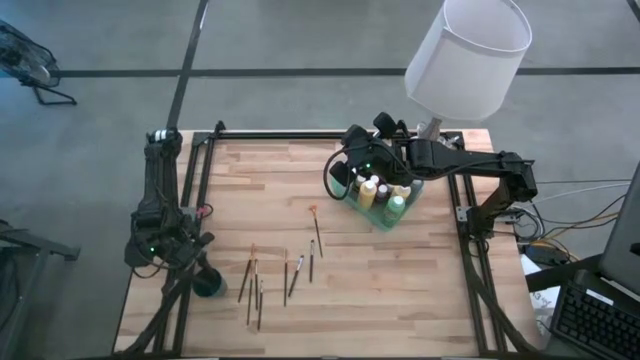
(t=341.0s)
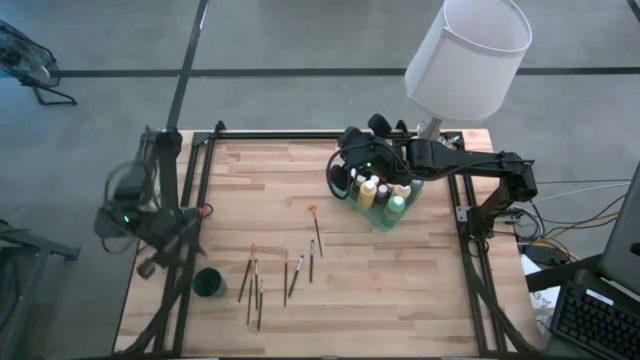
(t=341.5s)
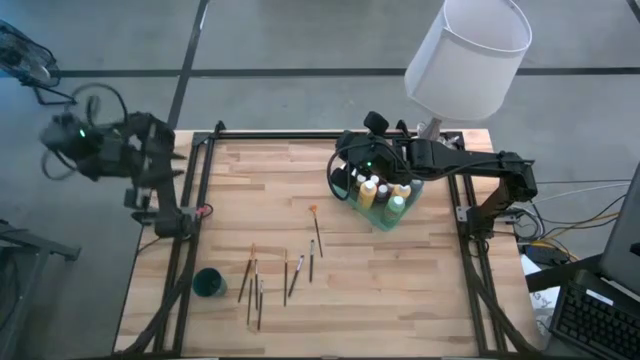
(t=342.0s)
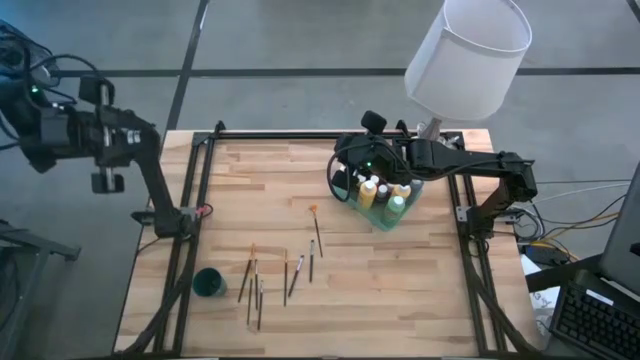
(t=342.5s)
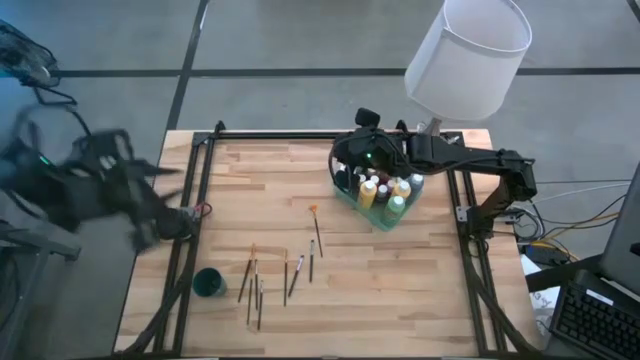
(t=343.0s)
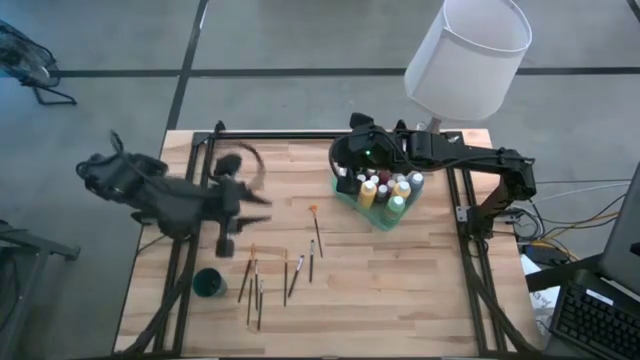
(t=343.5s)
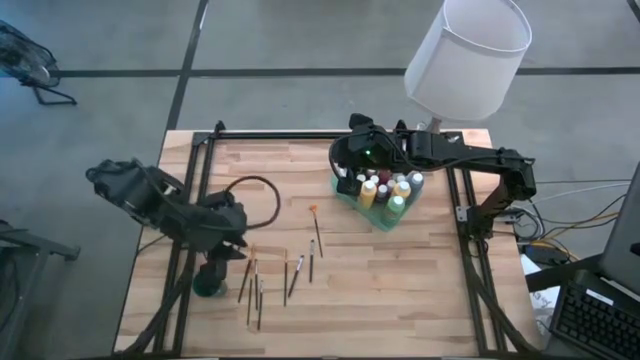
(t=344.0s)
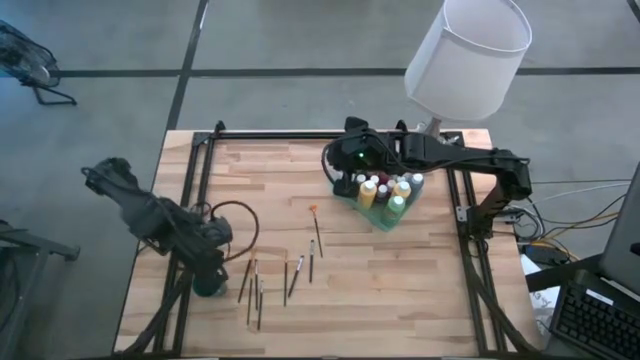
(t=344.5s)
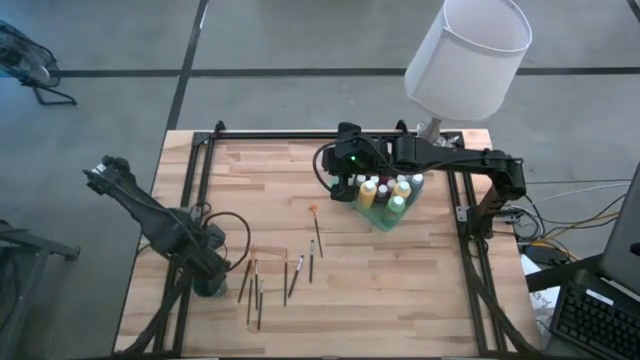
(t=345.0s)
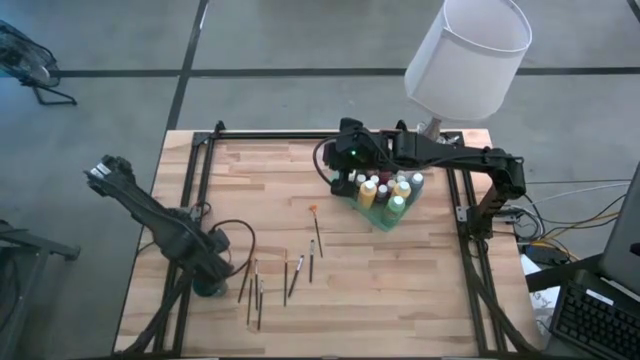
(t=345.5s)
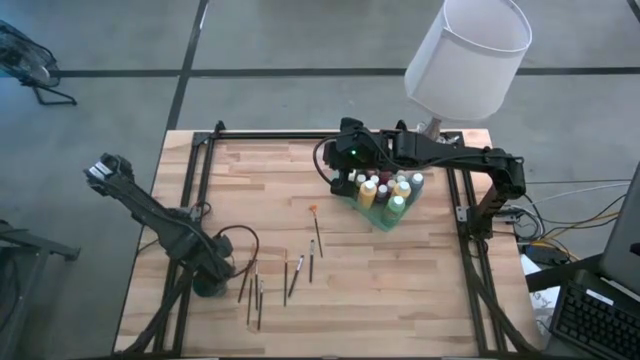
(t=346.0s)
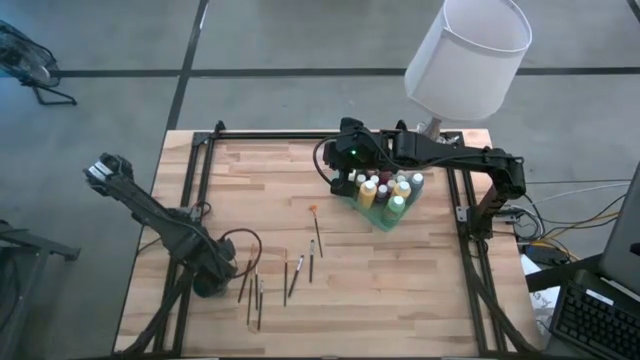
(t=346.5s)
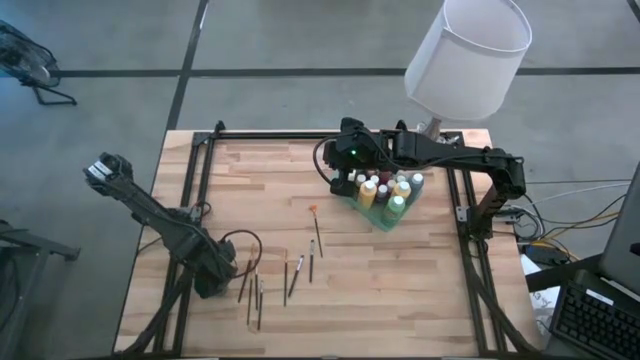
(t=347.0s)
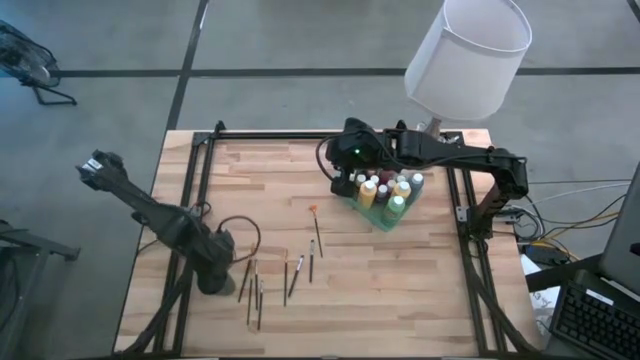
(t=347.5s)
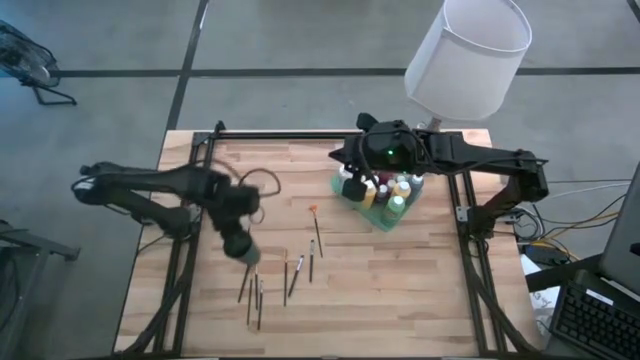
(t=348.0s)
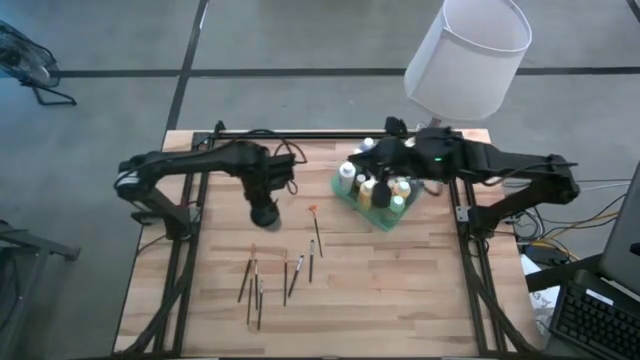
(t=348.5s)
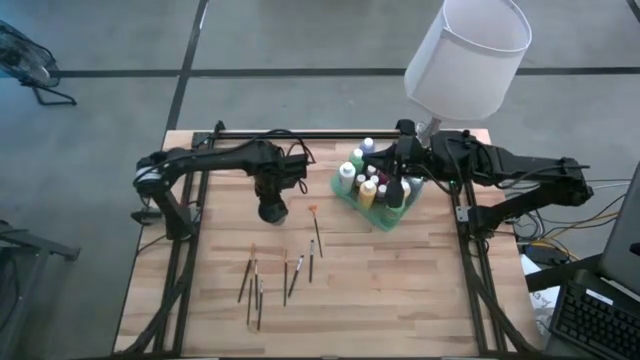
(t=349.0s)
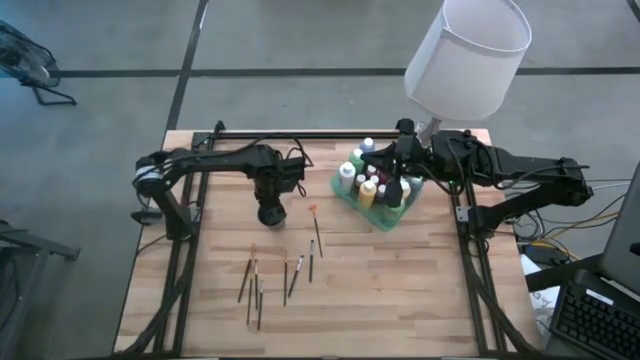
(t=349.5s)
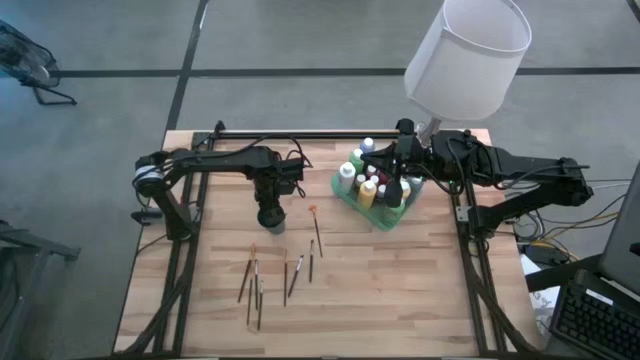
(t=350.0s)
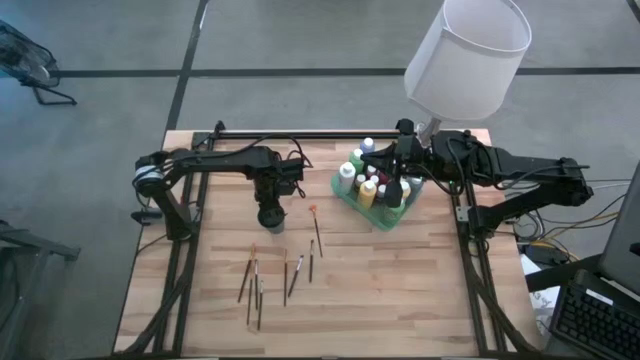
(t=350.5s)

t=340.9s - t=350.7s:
Task: Pick & Place Paint Supplies
Move the green cup to the middle left of the table

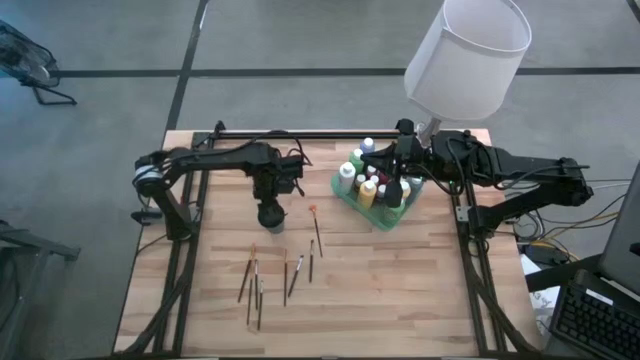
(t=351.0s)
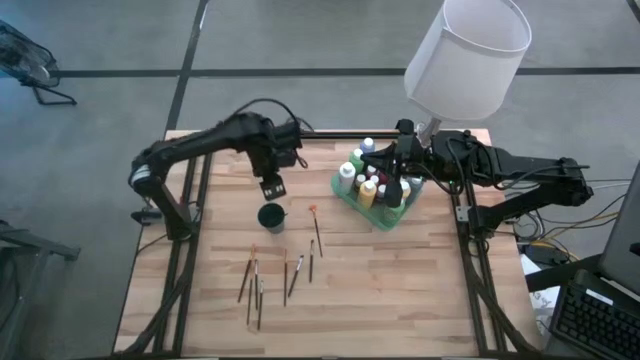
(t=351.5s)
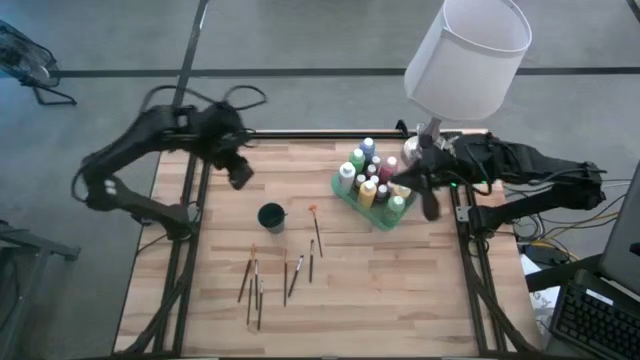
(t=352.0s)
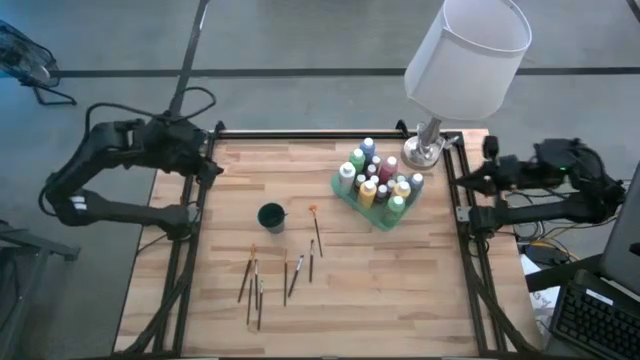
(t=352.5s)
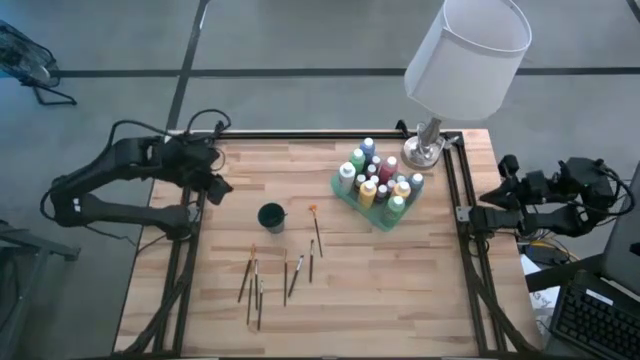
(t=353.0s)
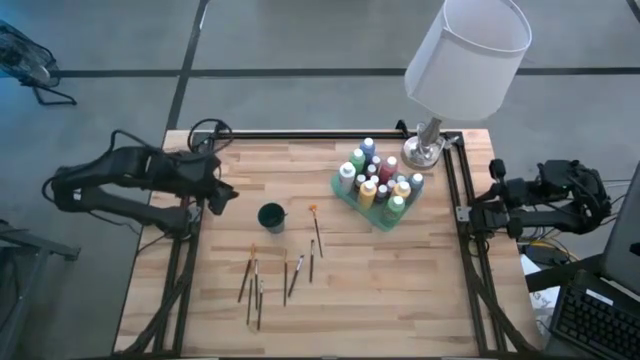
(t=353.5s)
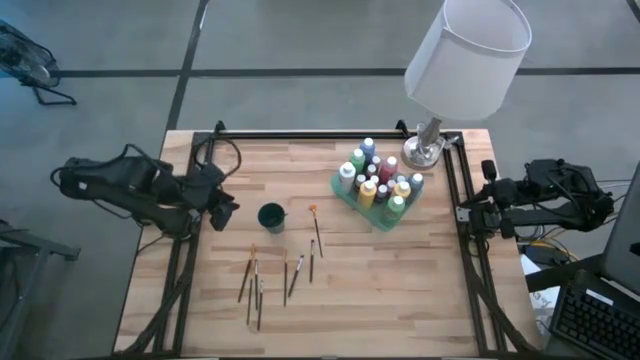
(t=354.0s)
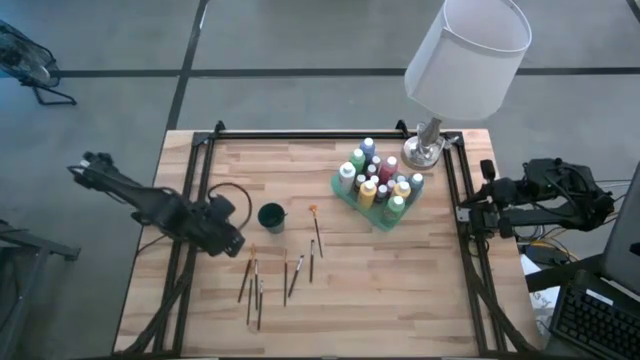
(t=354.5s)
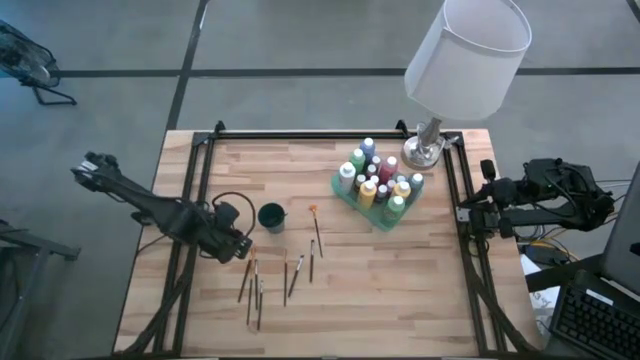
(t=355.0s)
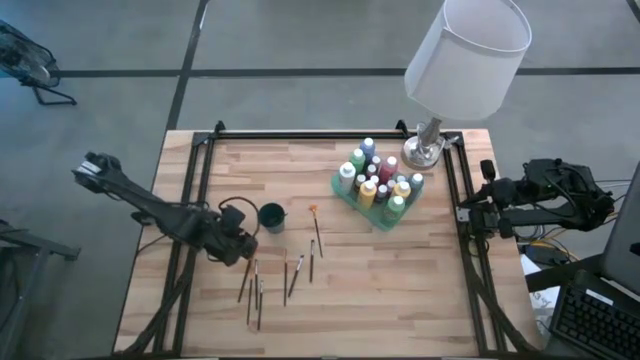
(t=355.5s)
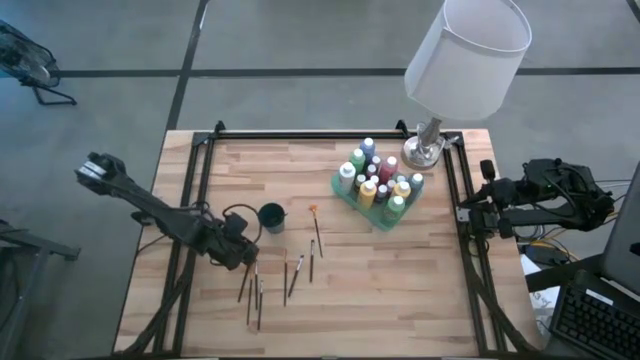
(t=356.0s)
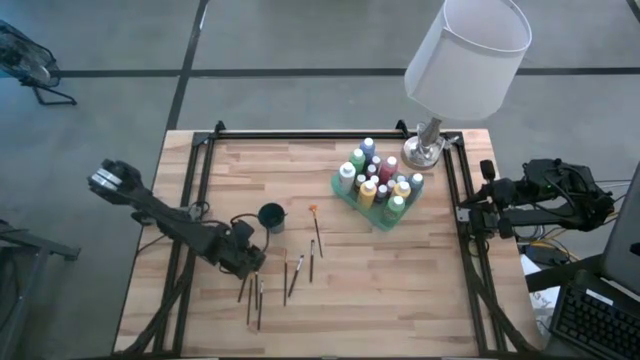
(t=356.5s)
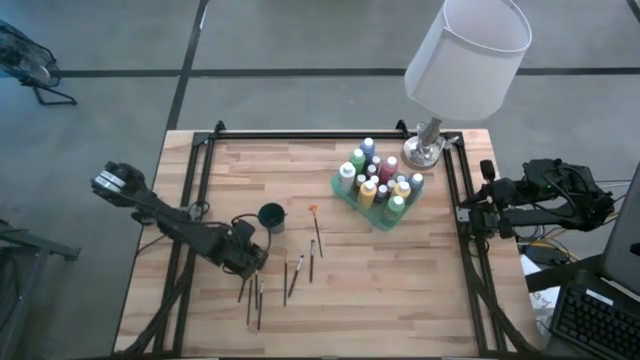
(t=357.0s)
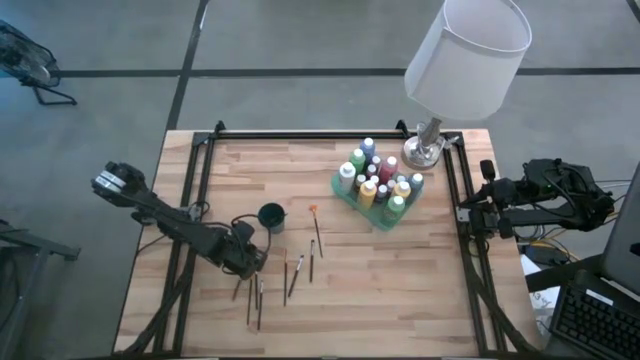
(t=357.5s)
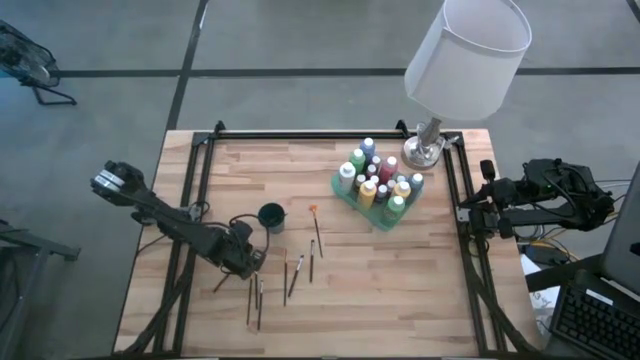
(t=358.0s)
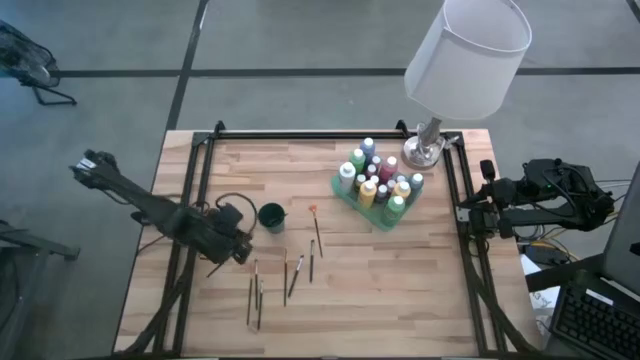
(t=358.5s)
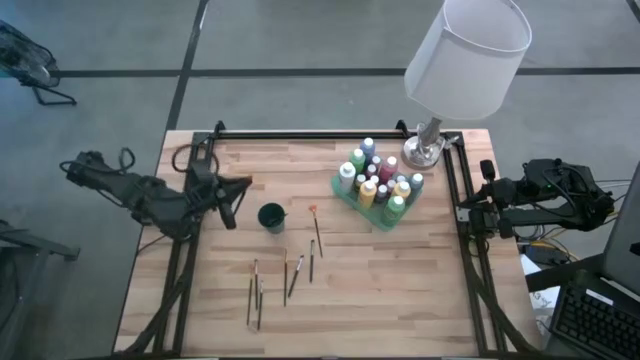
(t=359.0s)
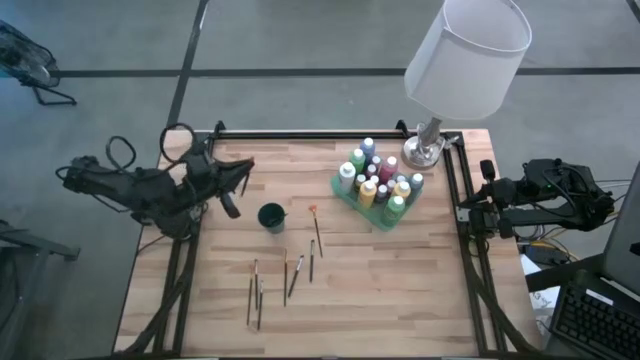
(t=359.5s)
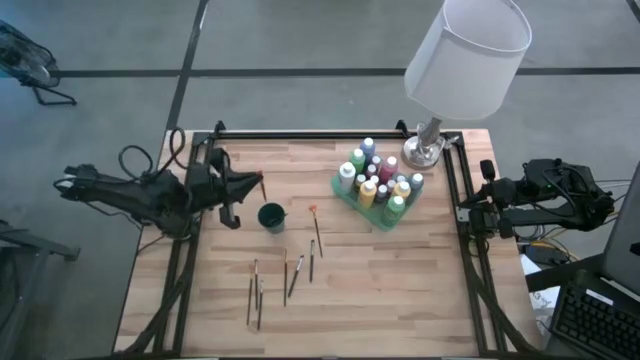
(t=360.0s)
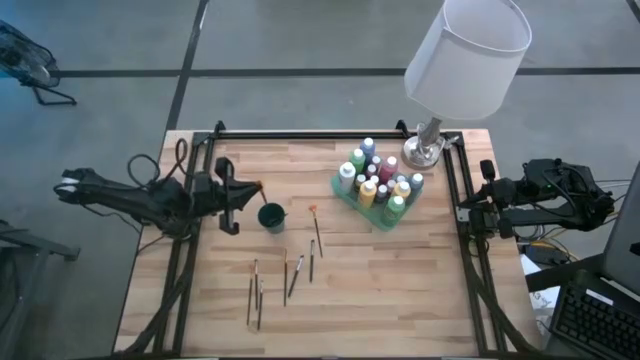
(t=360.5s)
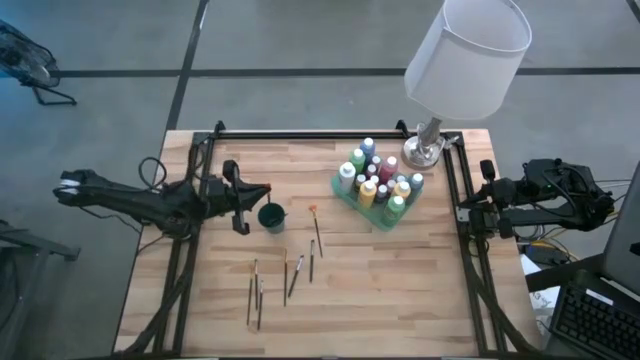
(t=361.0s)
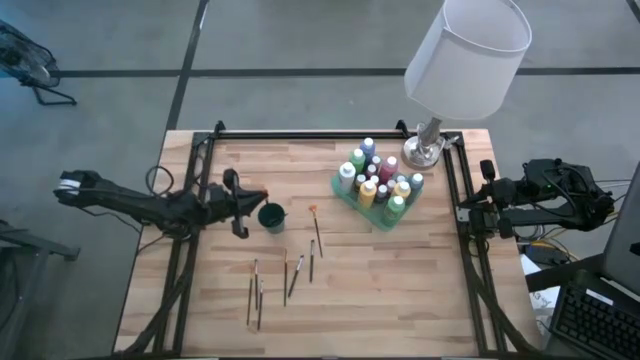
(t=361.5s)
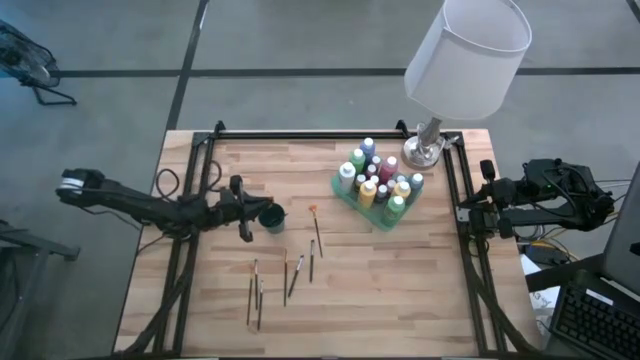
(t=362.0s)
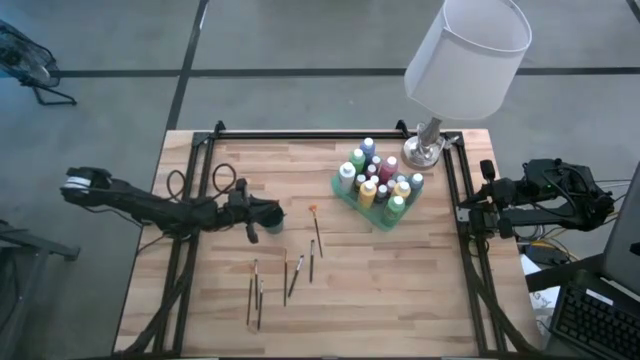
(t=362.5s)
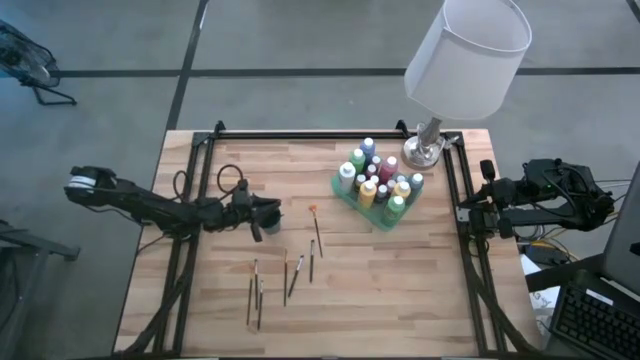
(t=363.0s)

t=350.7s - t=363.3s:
Put the orange paint brush into the green cup
